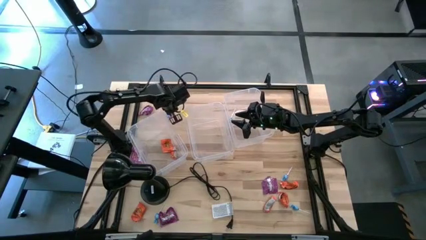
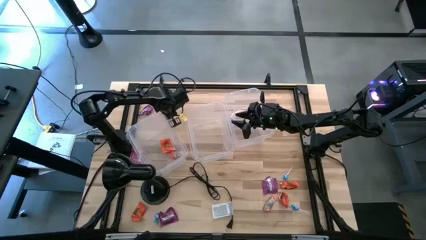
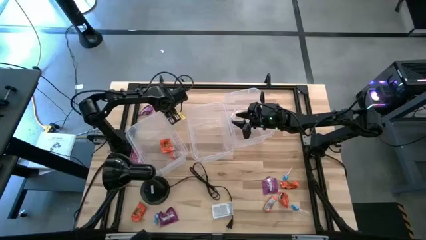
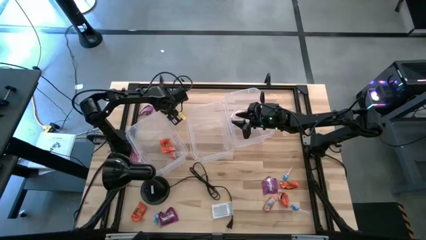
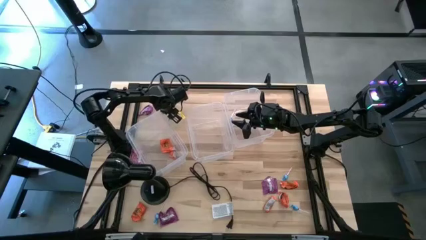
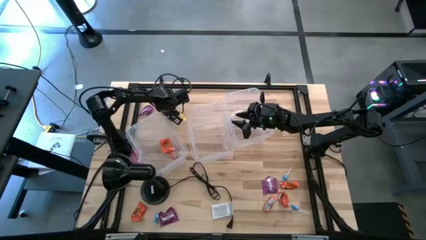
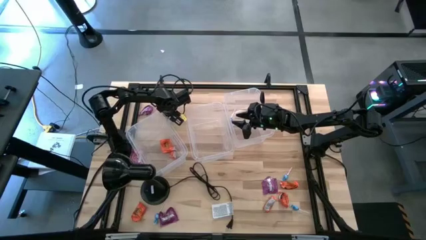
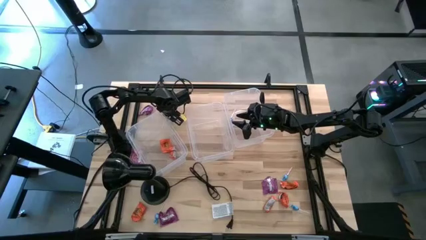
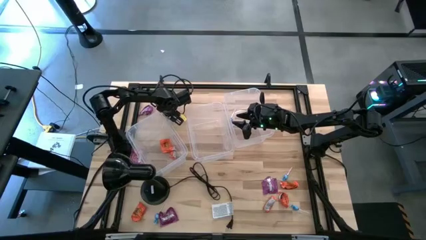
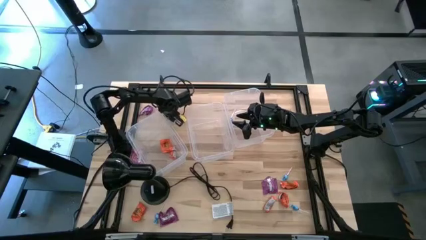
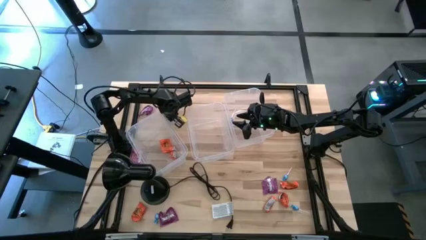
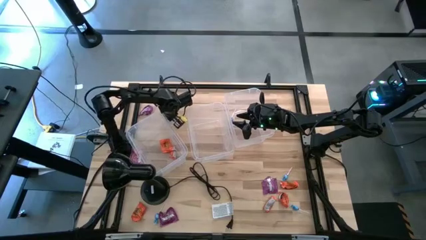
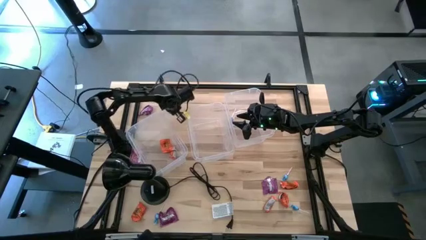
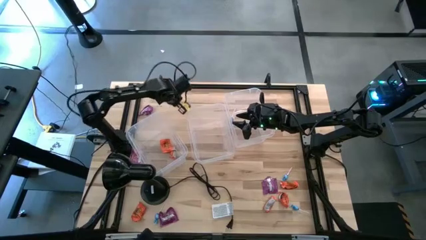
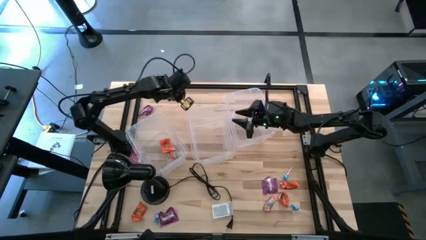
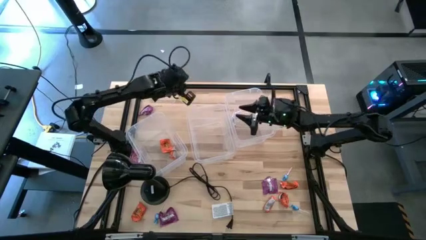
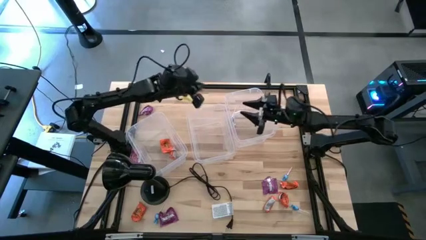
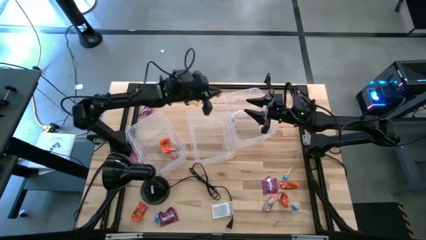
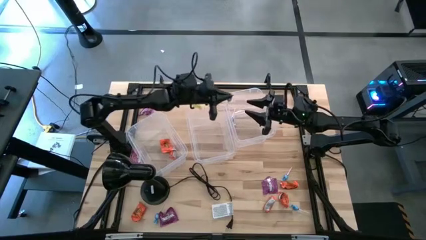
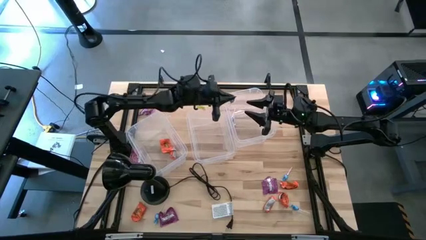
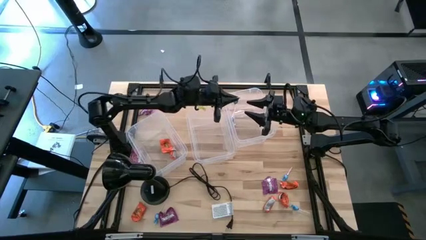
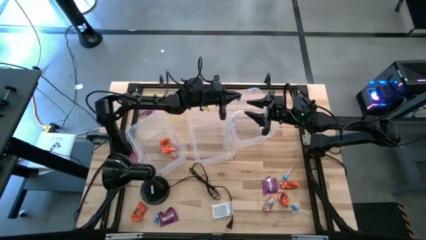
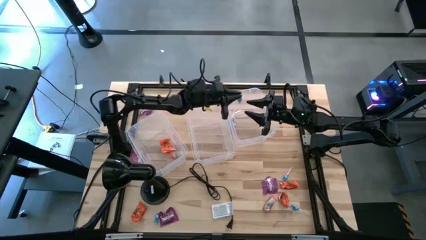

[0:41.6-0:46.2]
Task: Sort candy
Put the blue candy into the right transparent bin

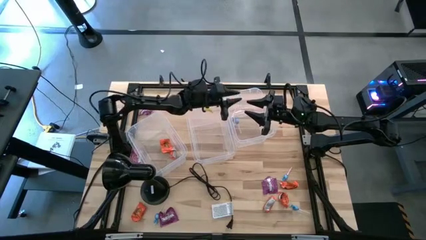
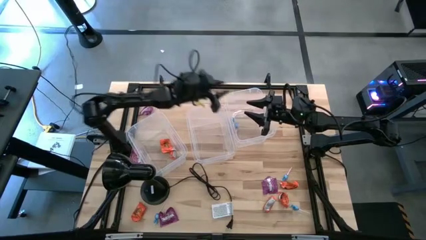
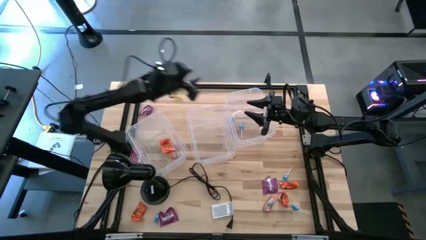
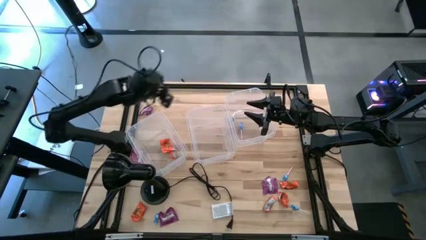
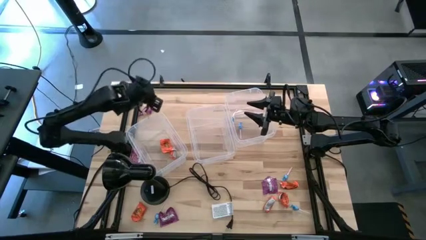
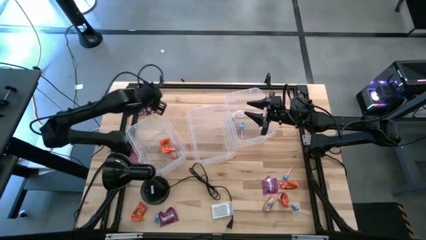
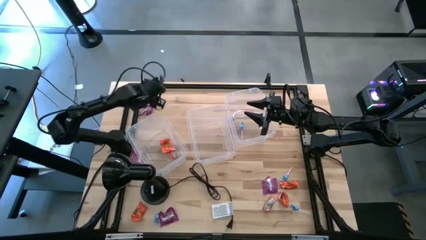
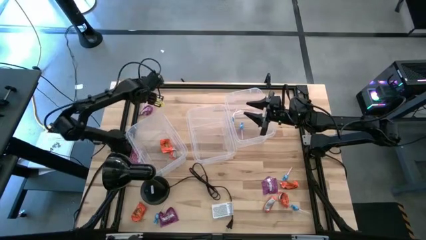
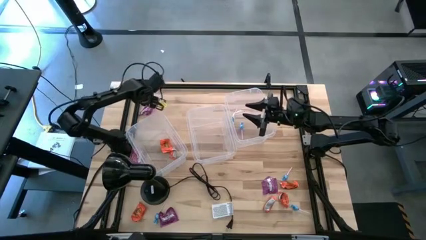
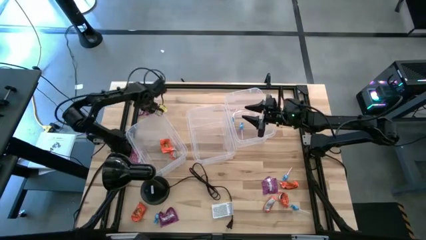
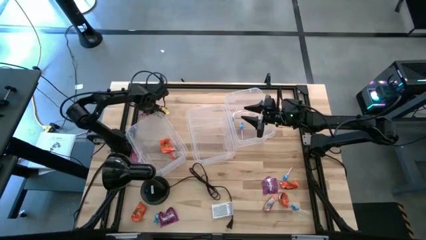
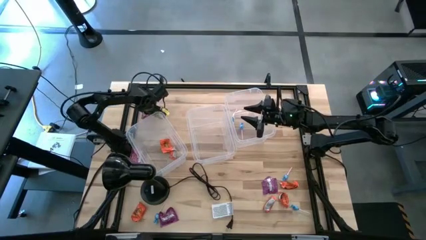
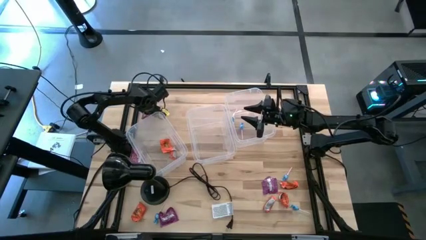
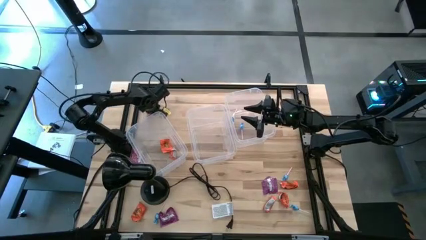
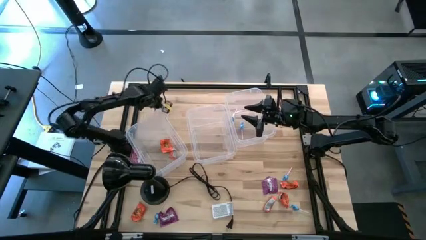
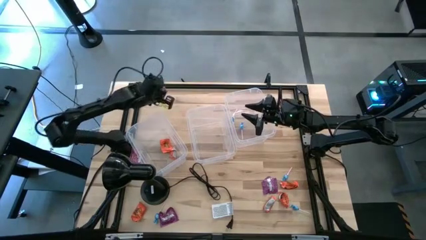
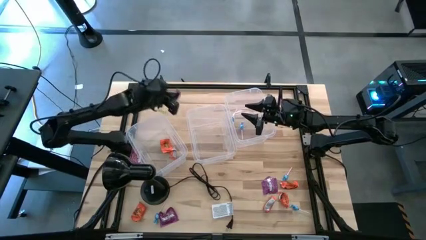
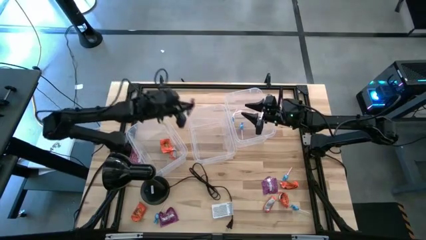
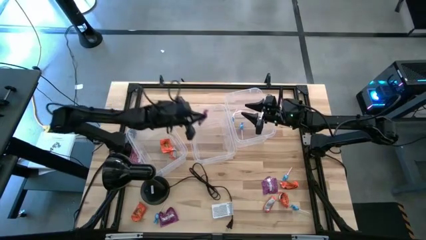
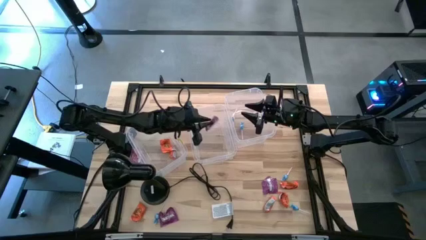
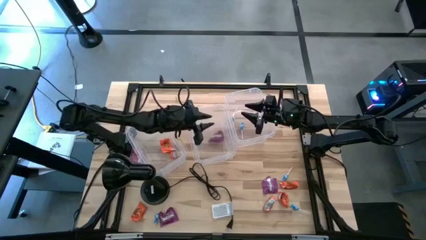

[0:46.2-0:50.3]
Put the violet candy into the center transparent bin

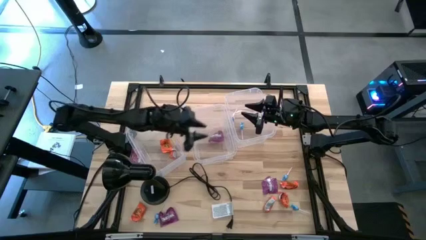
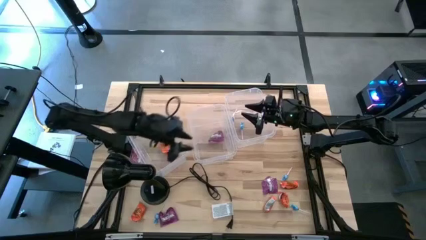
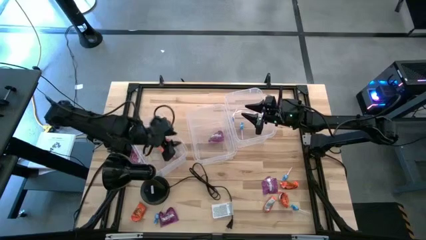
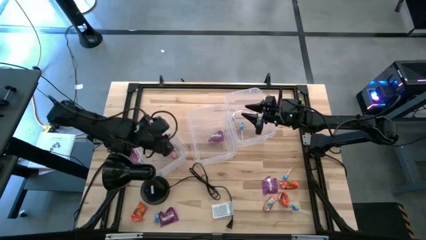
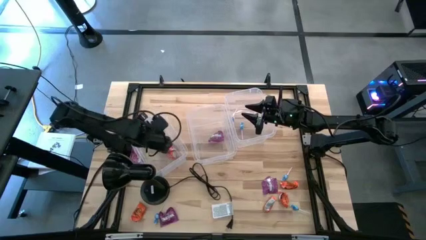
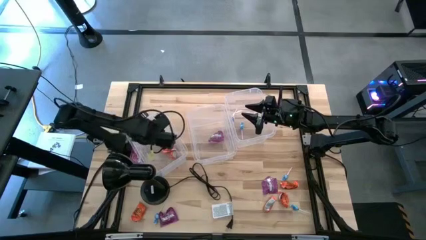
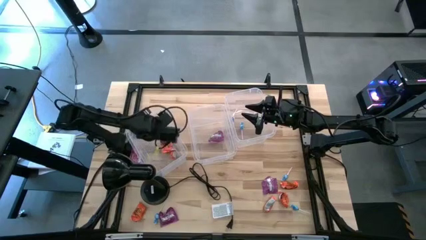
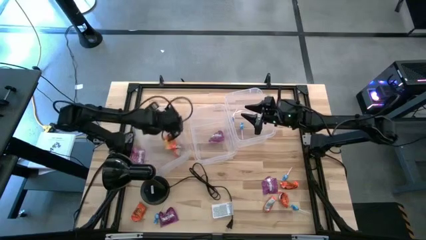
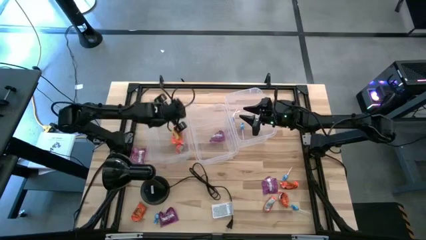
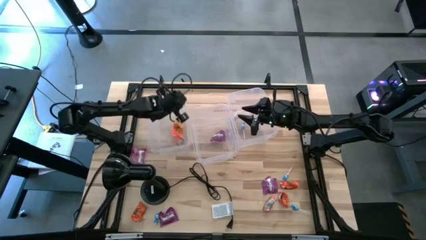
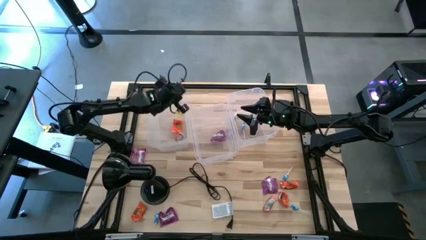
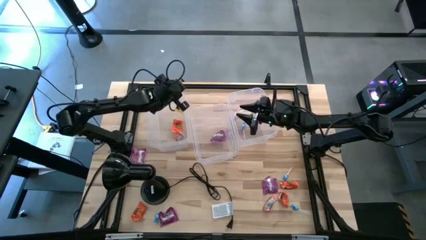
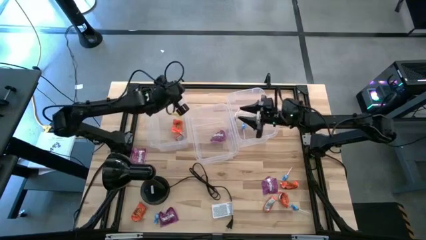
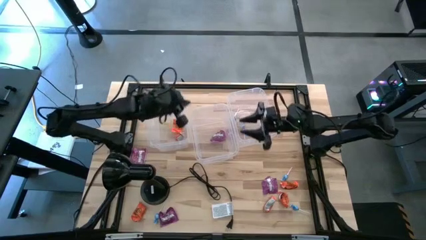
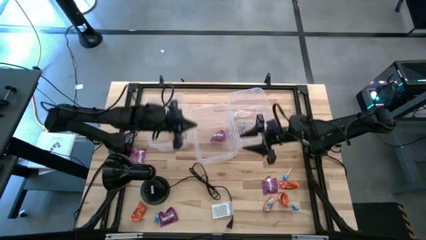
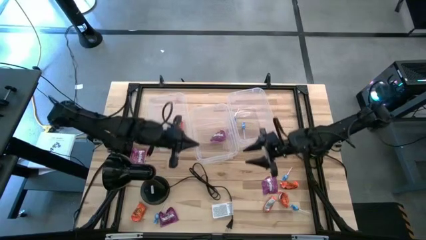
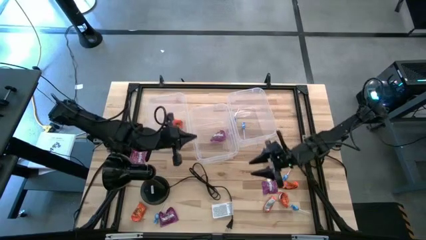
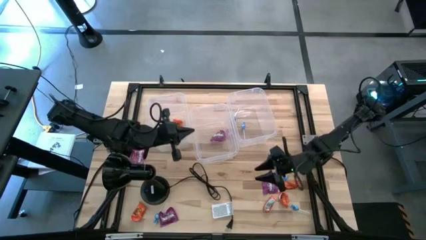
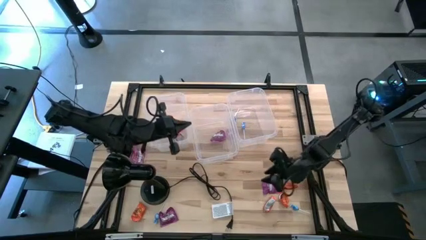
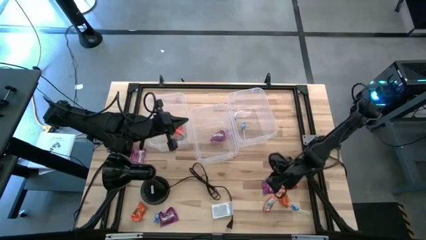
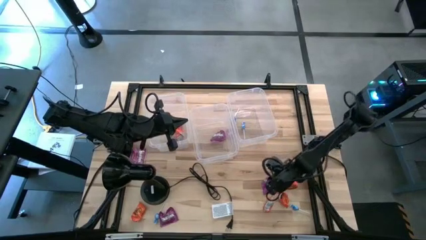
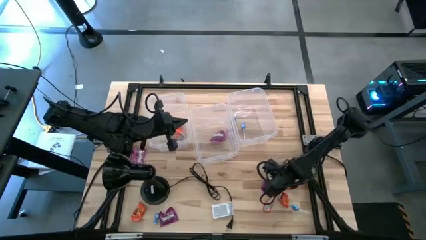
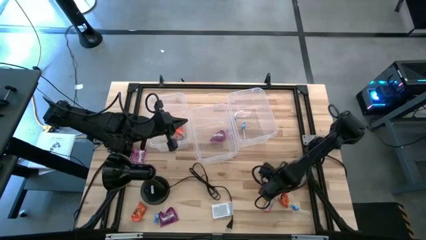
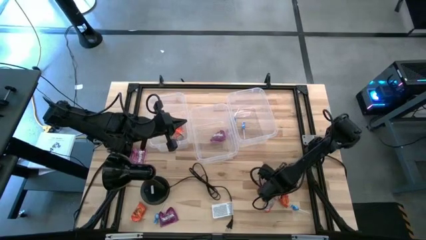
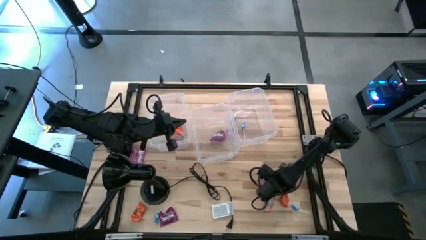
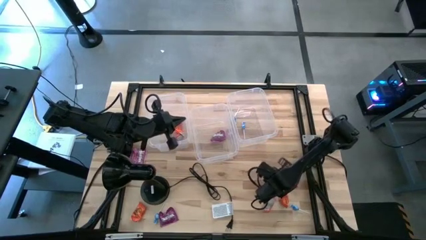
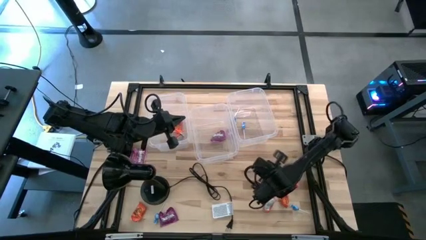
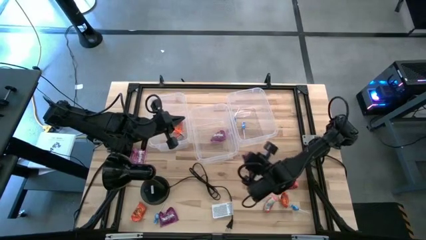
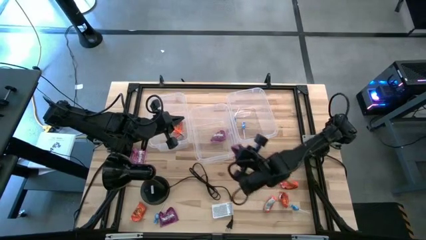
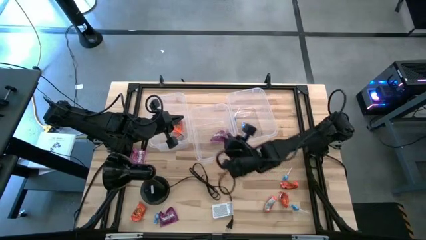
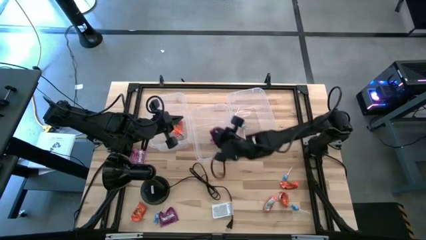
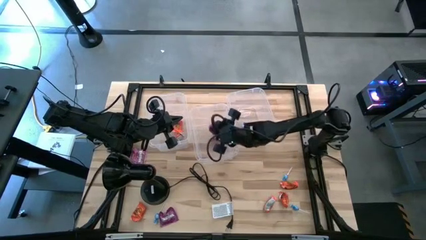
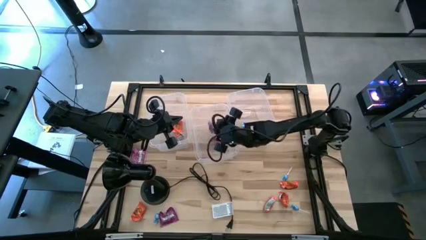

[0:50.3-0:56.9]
Put the violet candy into the center transparent bin
